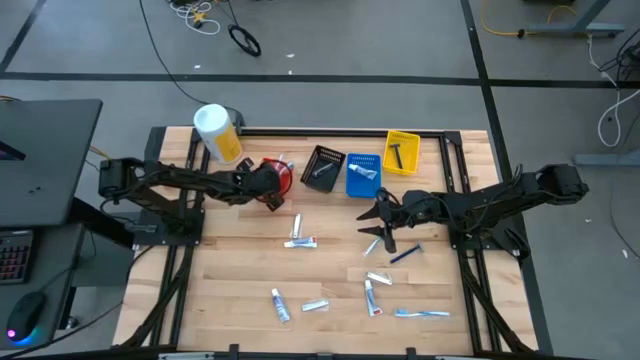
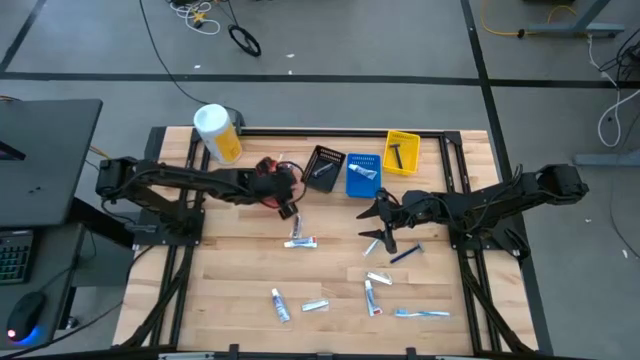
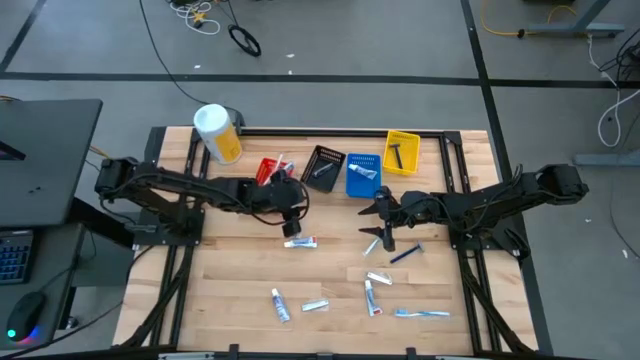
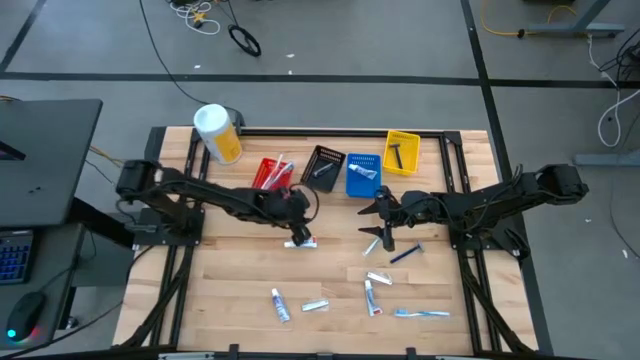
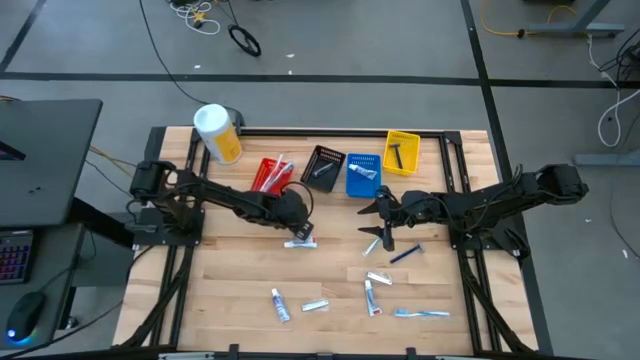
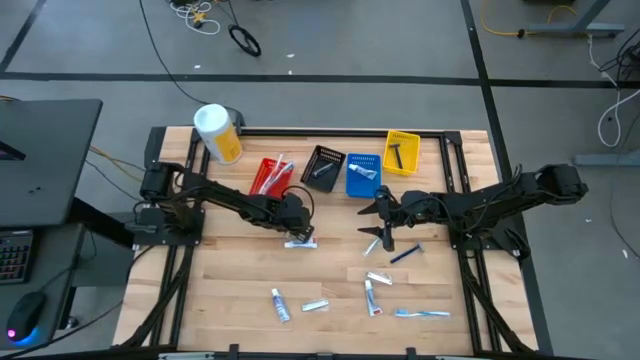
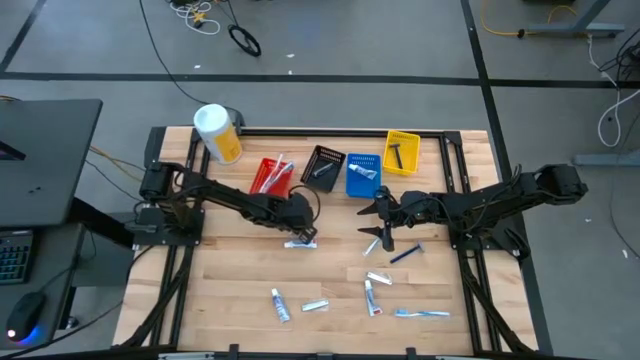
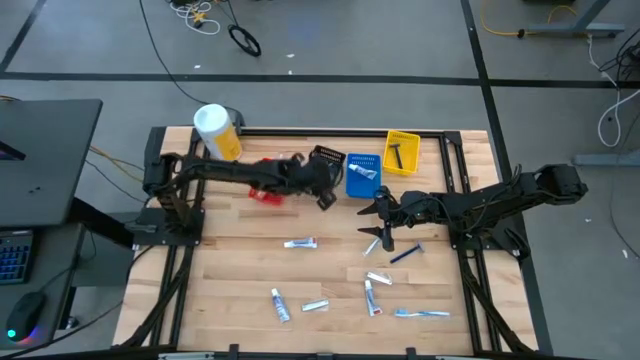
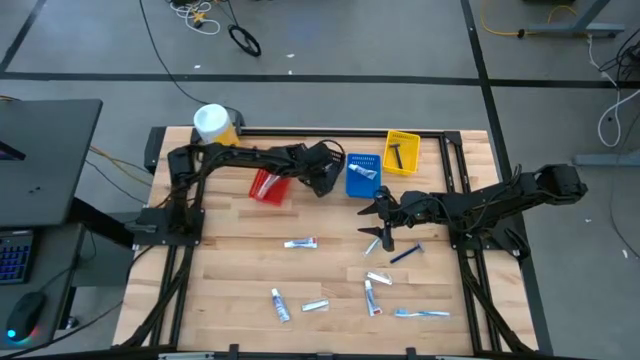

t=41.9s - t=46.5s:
Task: Pick & Place Travel size toiletries
Put the nail cutter into the black bin

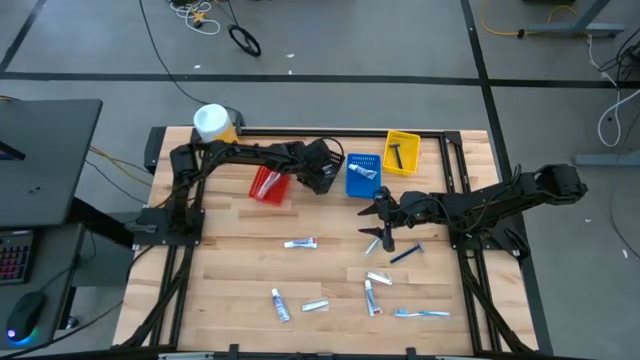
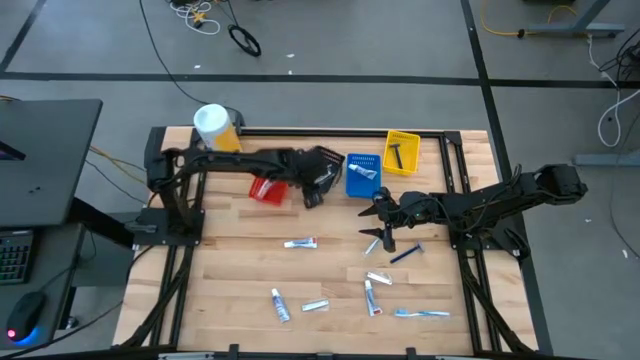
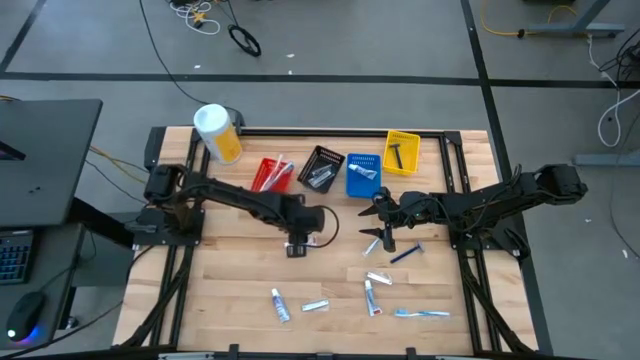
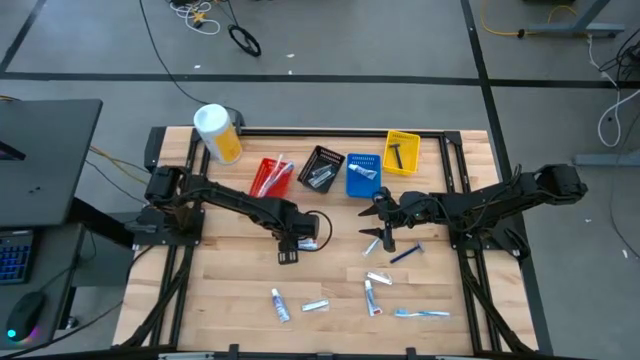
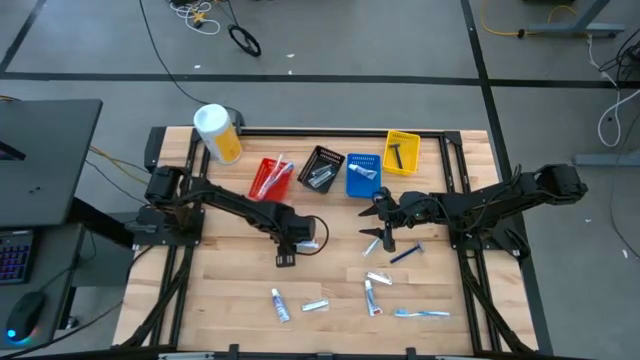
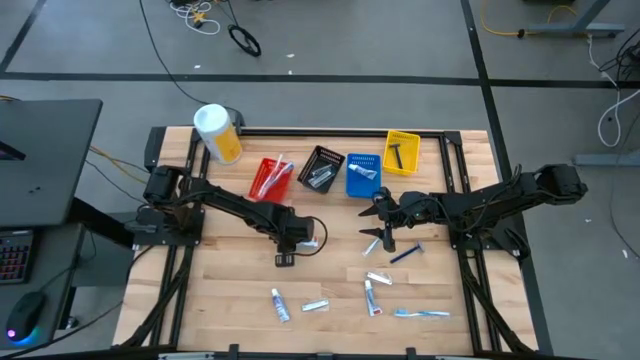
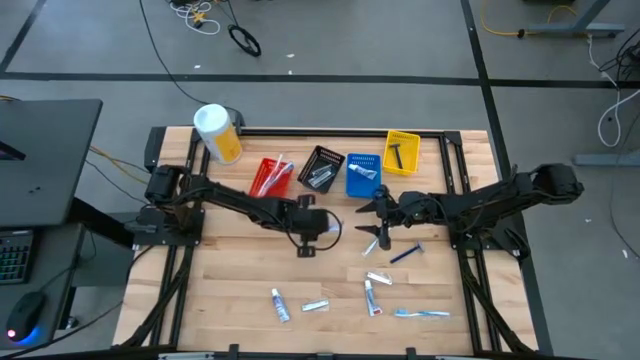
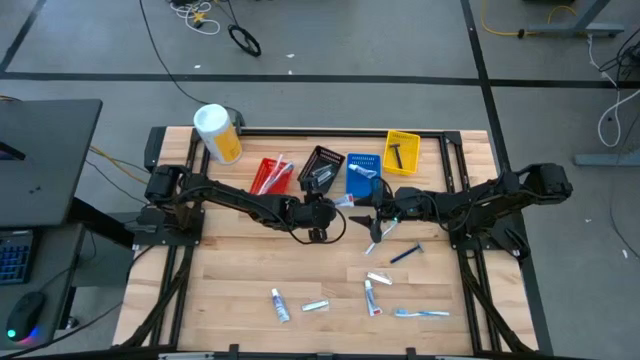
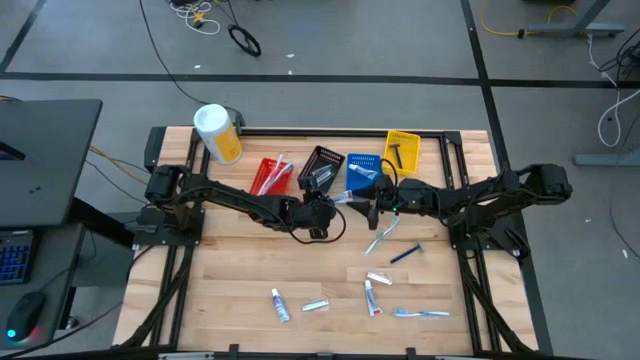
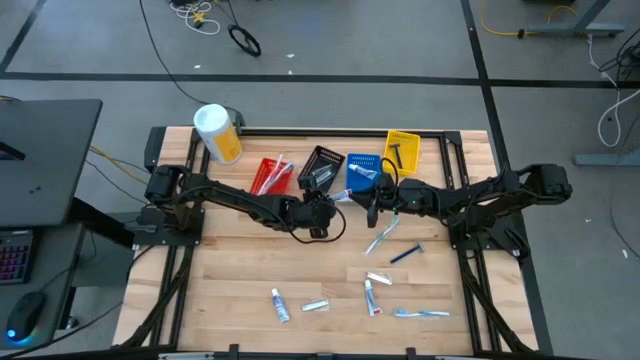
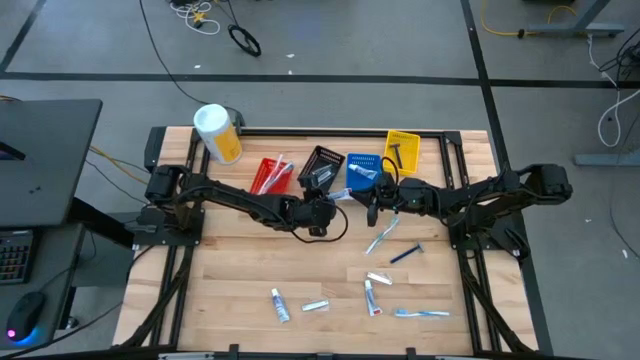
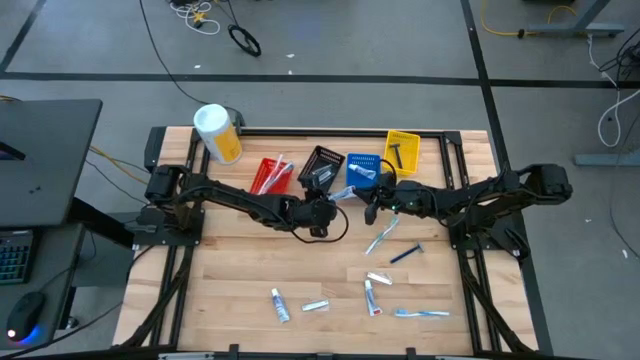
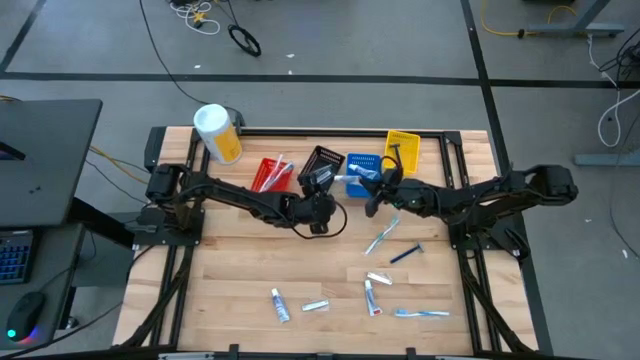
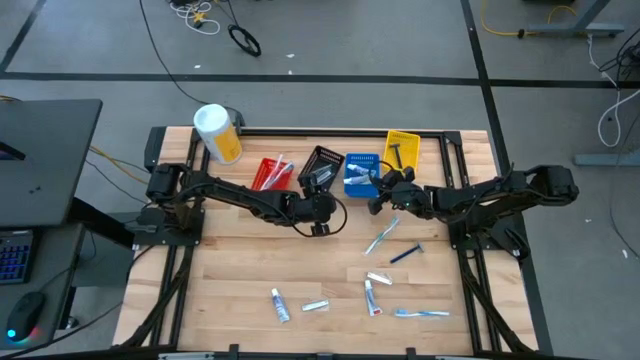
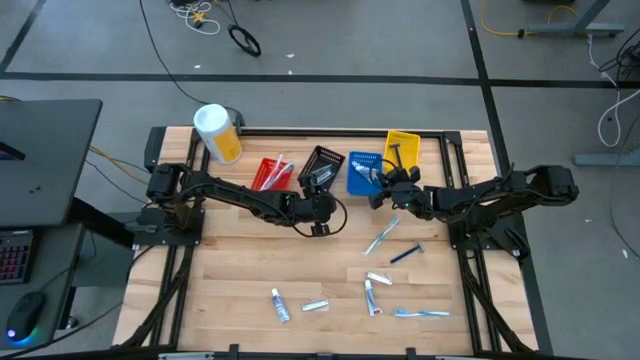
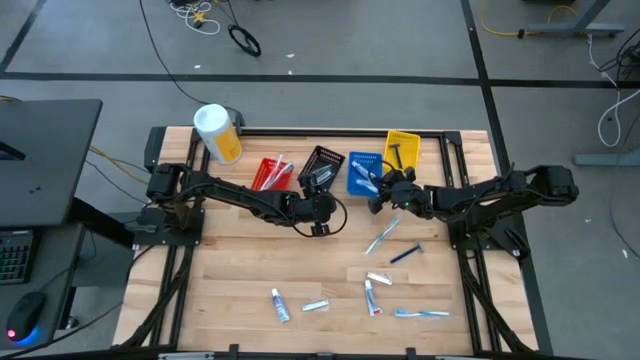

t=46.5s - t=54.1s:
Put the purple toothpaste into the blue bin

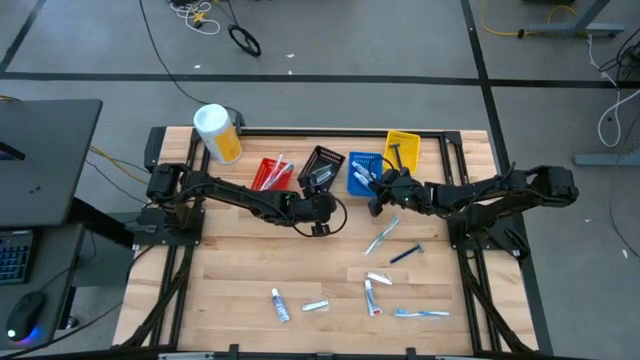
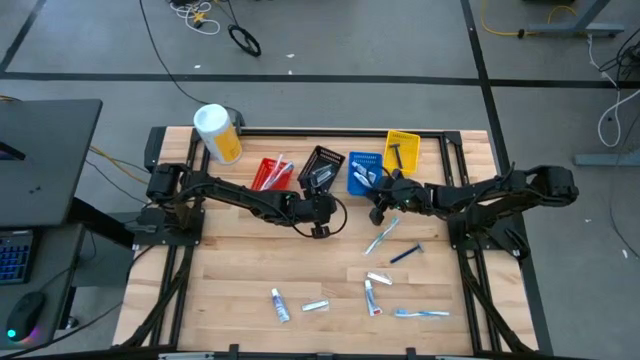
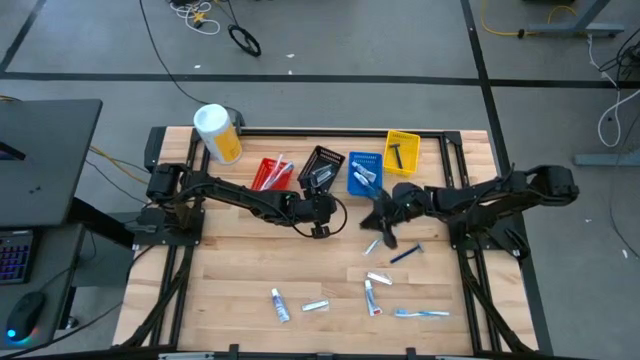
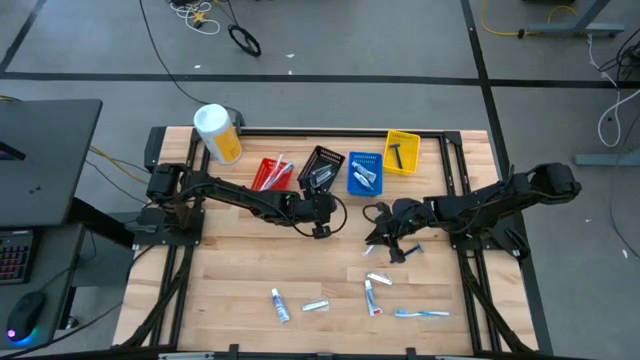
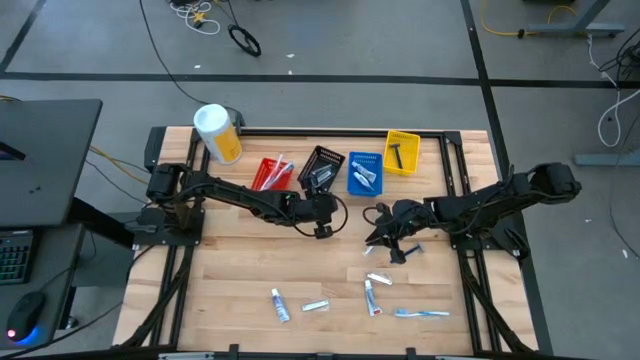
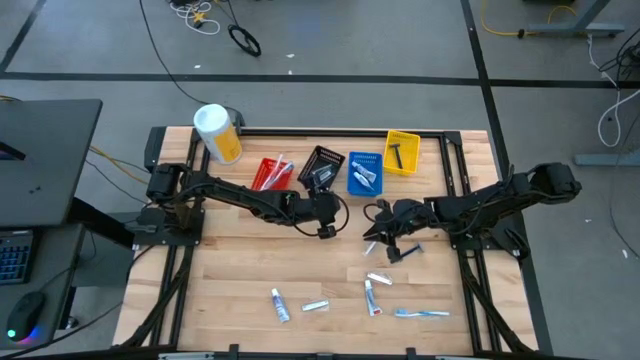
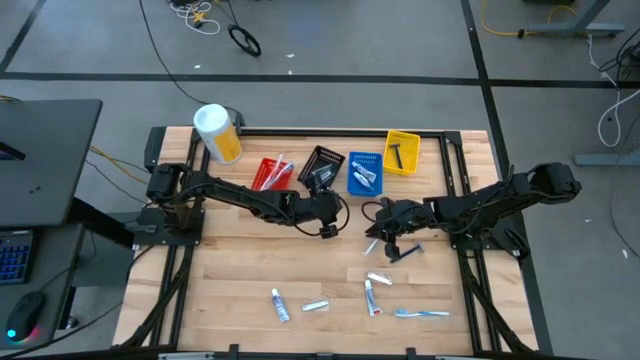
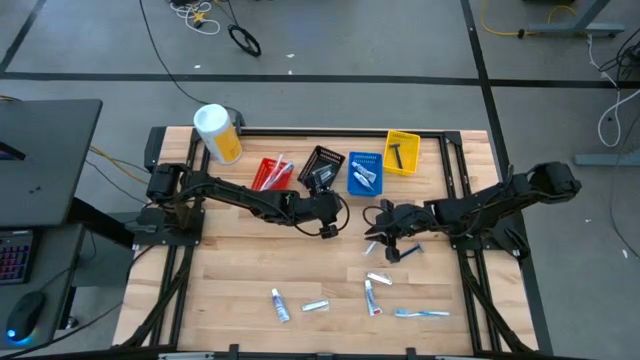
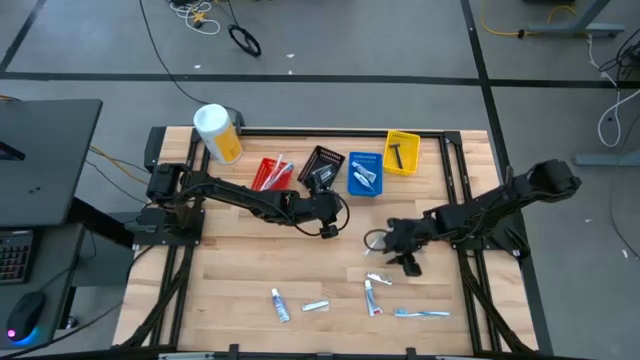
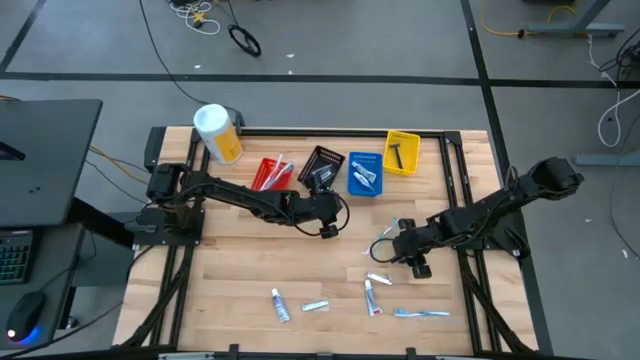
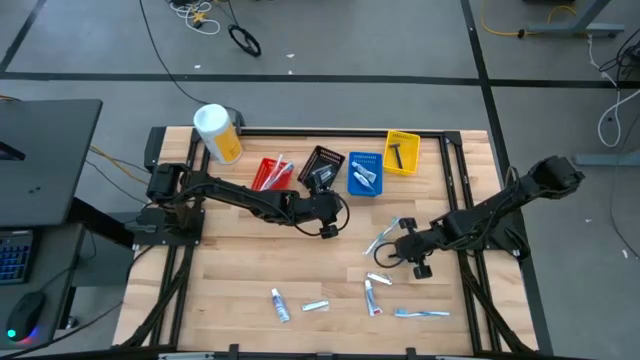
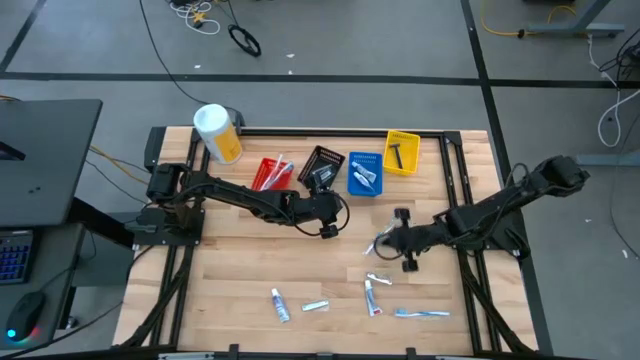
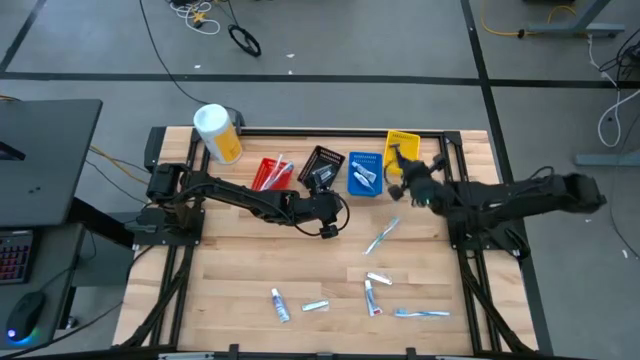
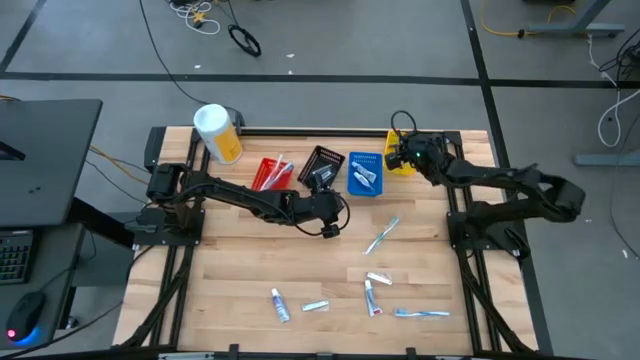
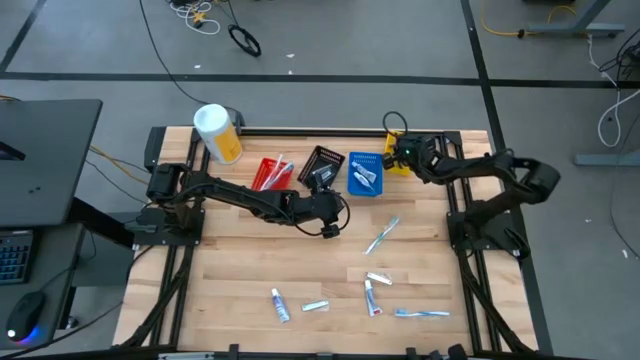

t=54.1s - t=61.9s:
Put the blue razor into the yellow bin

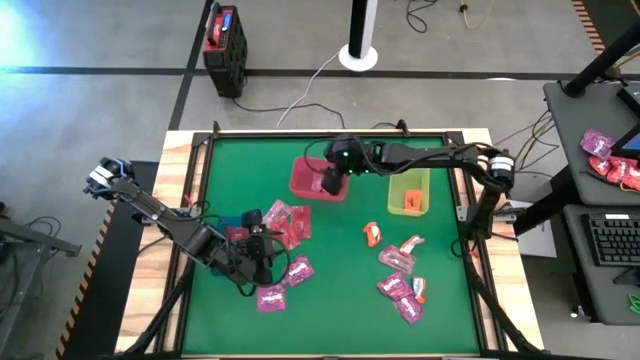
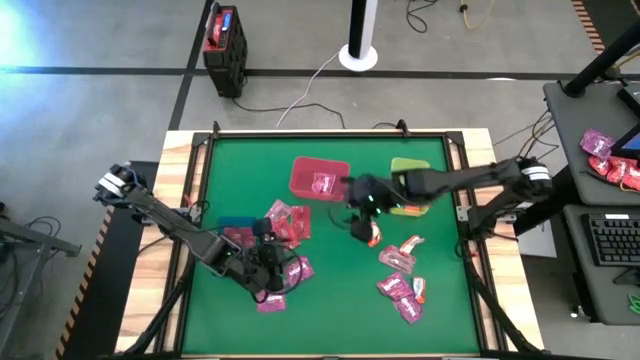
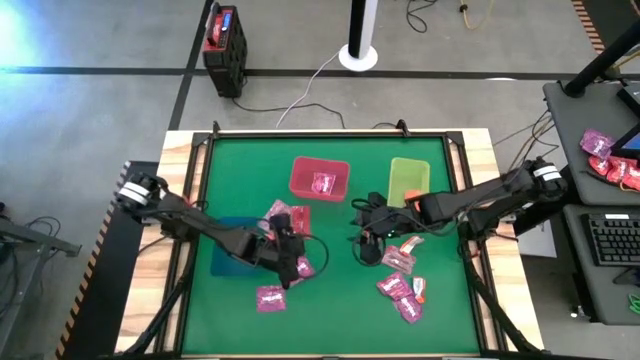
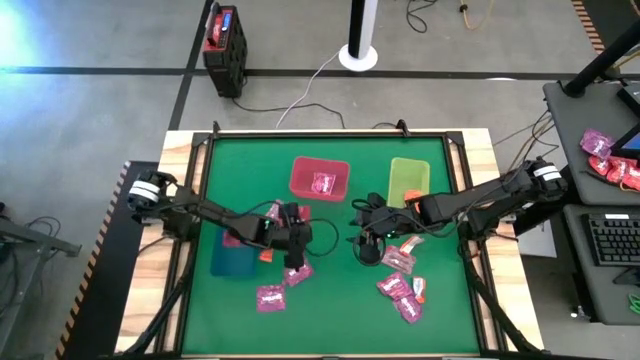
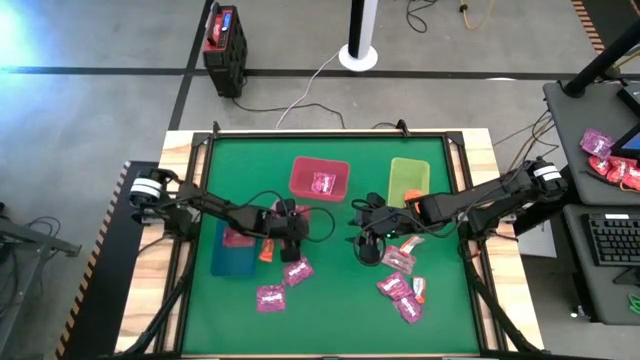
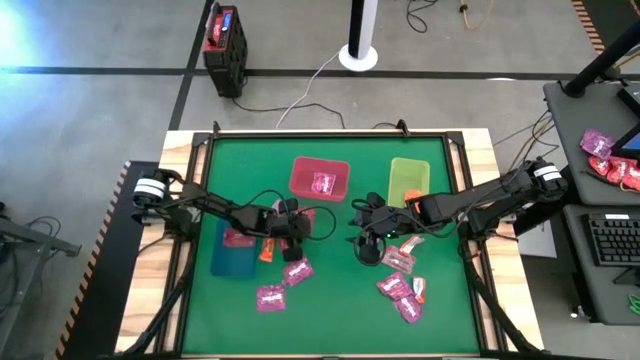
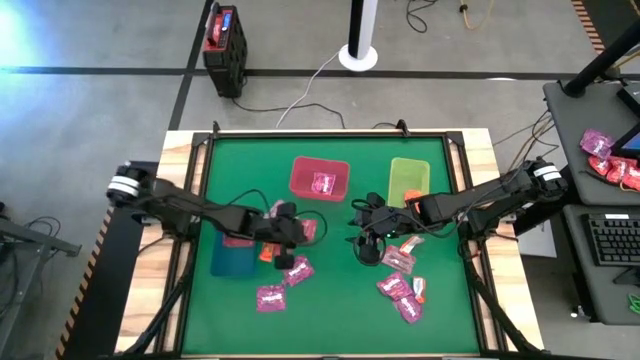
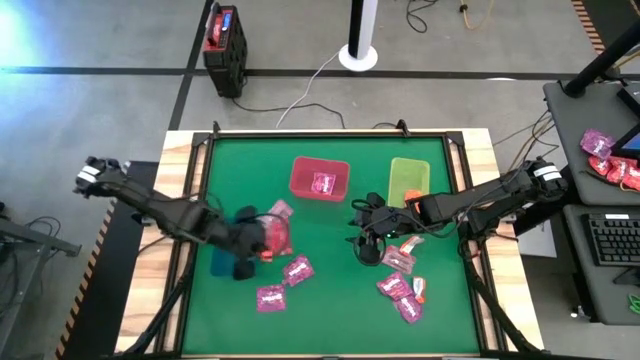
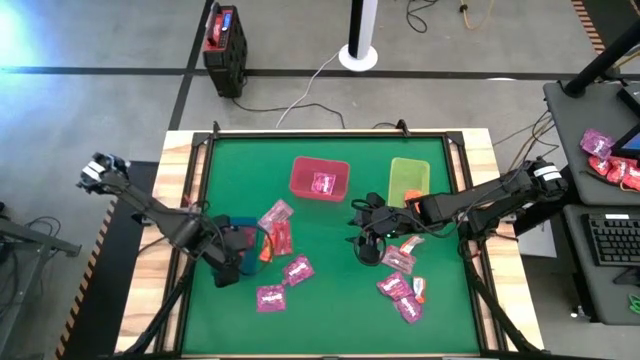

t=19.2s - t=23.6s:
Task: Sort candy by brand, put in halloween buckets
Put the red candy into the blue bin
